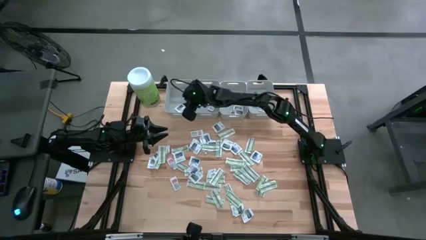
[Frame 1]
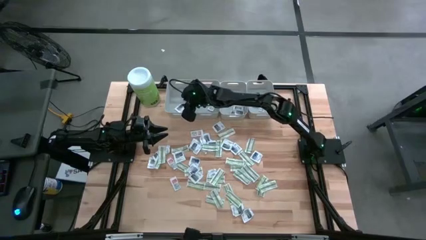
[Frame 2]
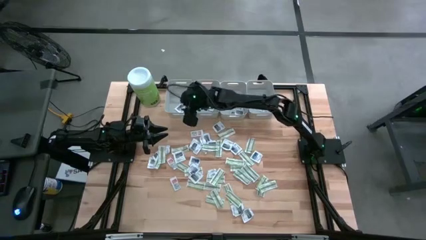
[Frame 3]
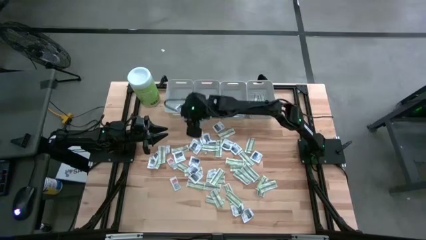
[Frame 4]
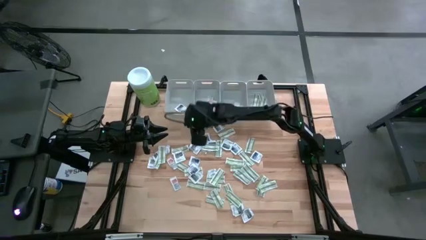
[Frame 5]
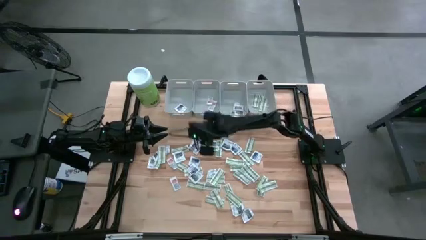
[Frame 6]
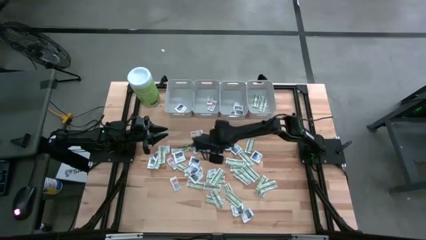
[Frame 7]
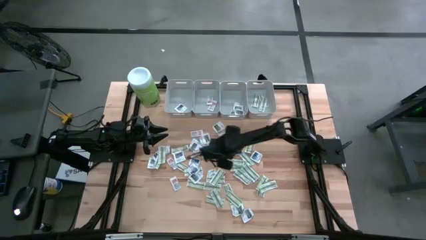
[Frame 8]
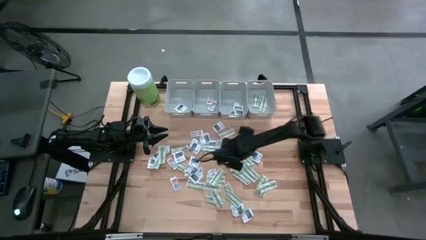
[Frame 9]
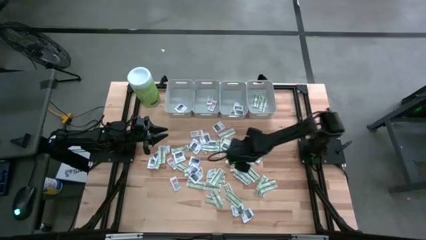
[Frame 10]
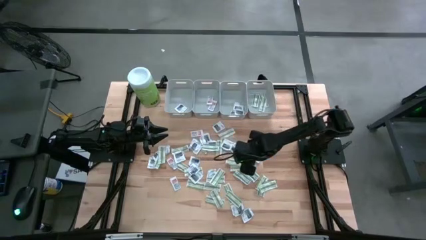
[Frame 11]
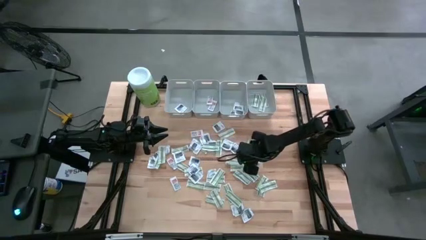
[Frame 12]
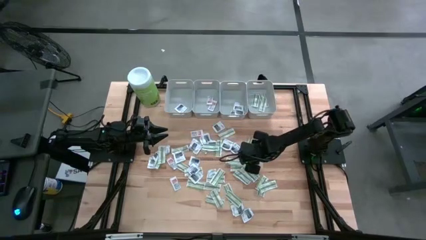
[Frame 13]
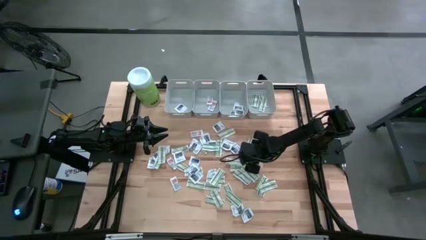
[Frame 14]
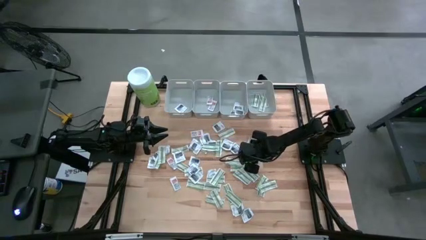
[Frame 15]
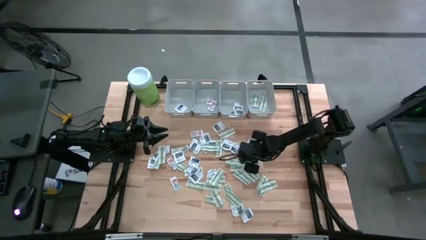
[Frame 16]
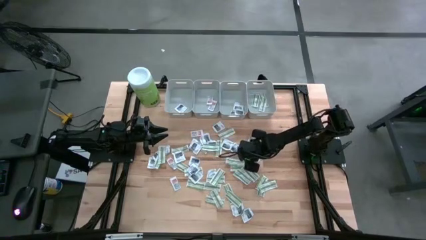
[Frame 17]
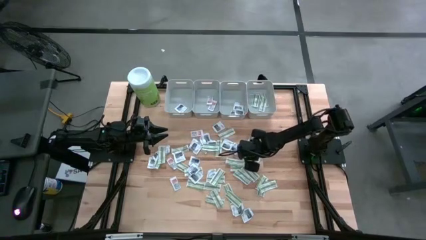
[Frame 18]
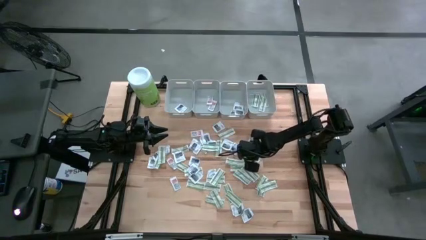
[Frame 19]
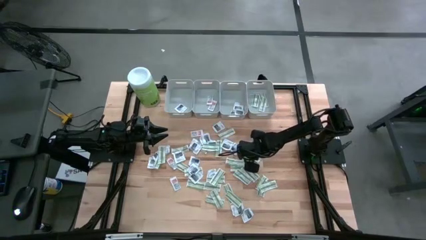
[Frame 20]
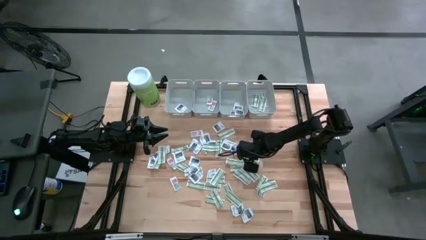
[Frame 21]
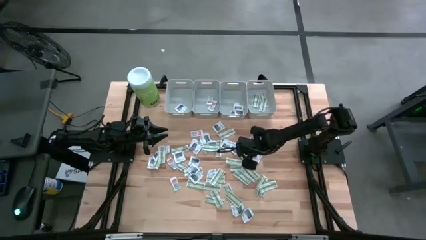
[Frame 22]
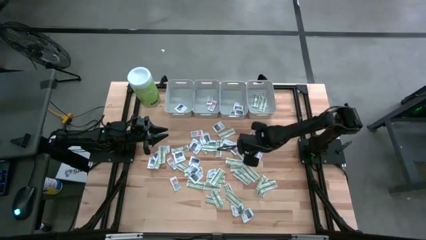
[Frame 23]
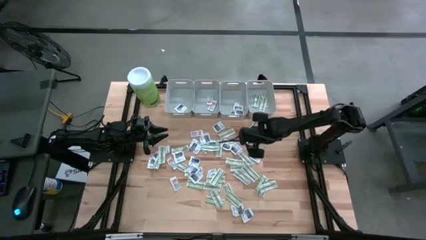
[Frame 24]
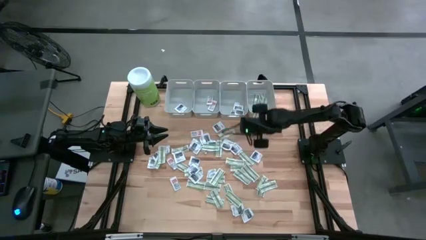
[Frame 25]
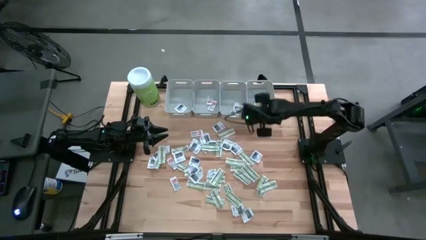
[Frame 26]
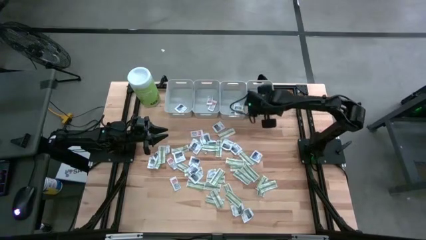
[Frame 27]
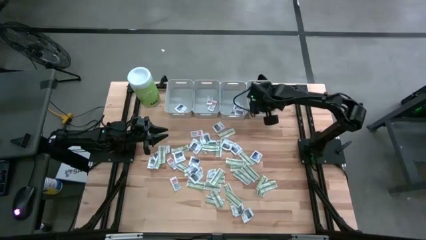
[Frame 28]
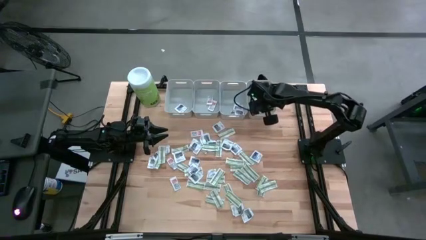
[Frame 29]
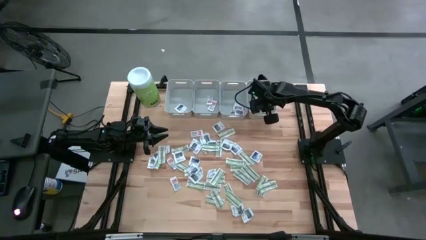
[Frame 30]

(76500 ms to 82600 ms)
Task: Pick & Place First Aid Supplies
Put the bandage into the right gray bin

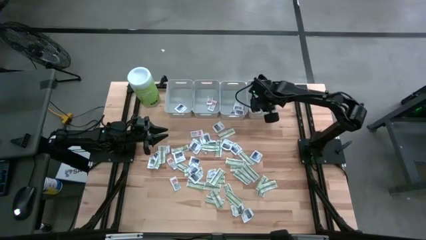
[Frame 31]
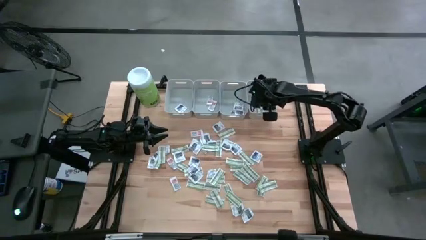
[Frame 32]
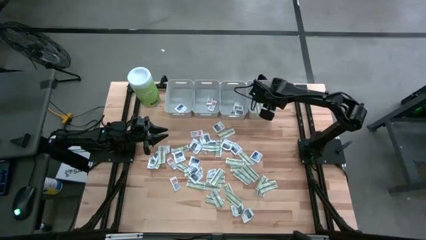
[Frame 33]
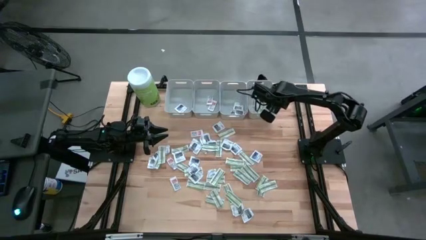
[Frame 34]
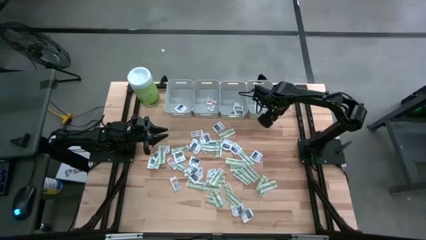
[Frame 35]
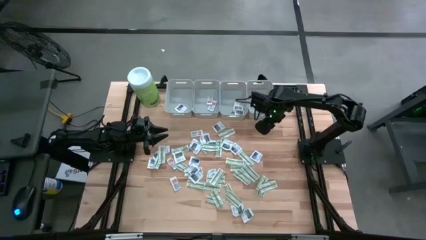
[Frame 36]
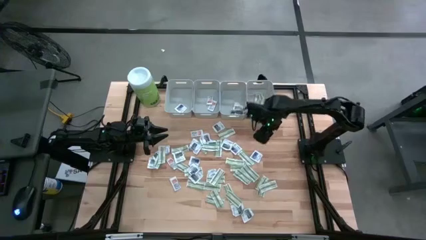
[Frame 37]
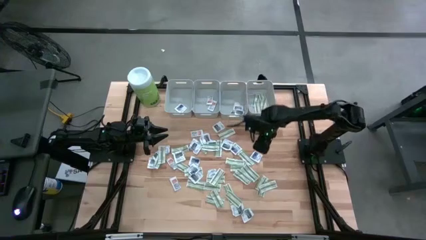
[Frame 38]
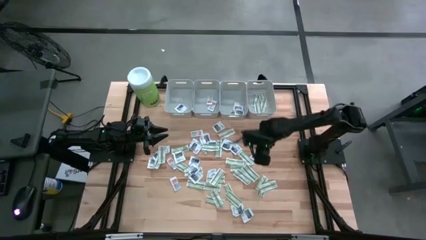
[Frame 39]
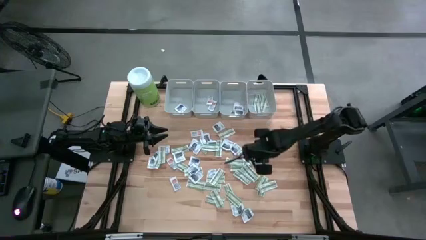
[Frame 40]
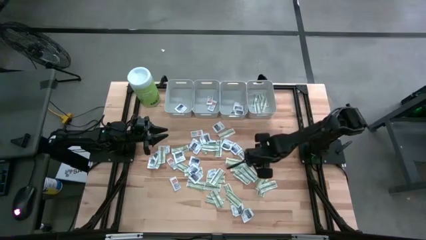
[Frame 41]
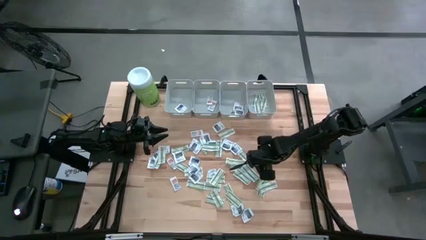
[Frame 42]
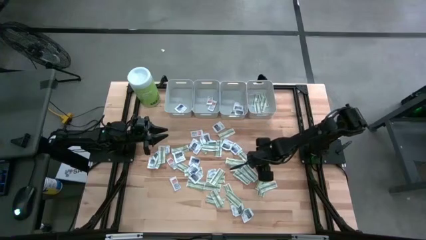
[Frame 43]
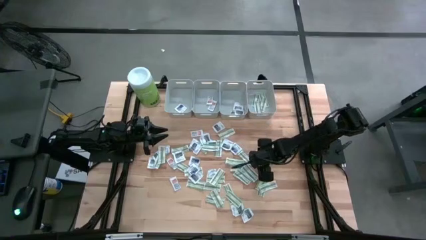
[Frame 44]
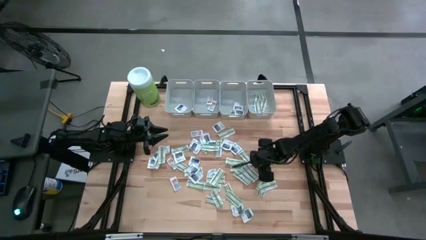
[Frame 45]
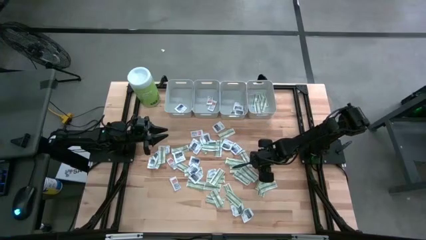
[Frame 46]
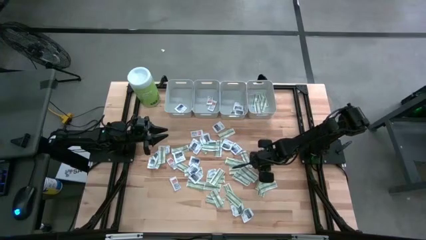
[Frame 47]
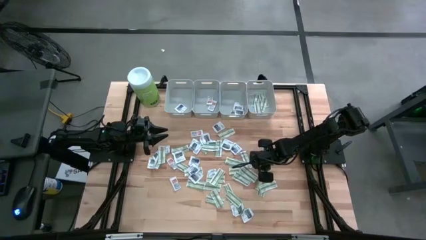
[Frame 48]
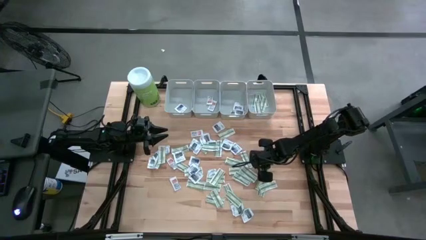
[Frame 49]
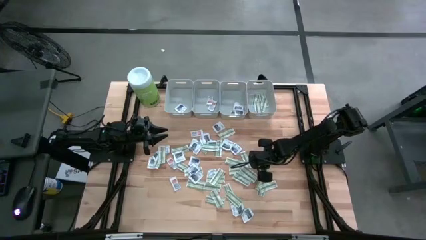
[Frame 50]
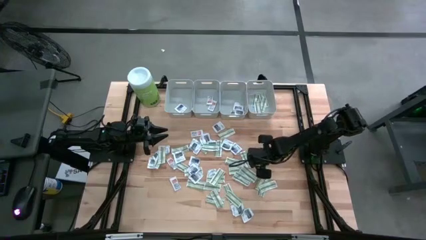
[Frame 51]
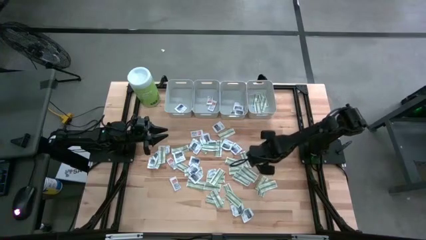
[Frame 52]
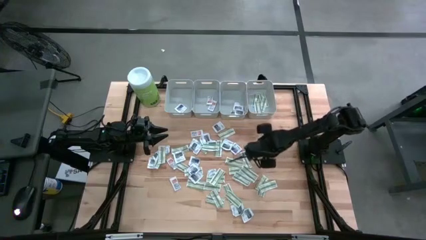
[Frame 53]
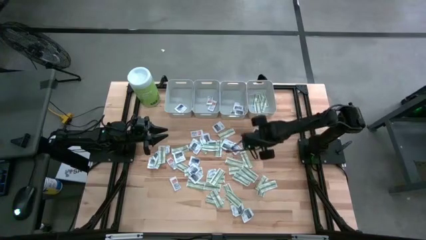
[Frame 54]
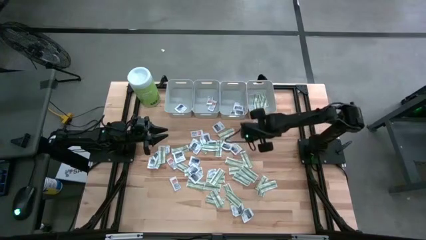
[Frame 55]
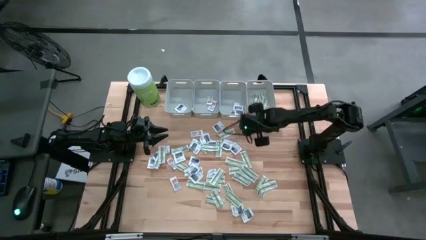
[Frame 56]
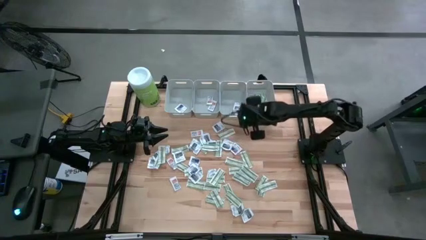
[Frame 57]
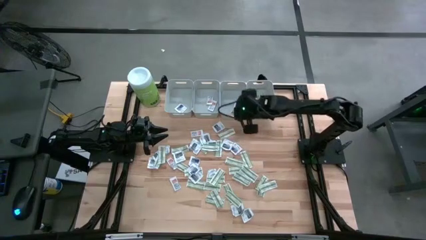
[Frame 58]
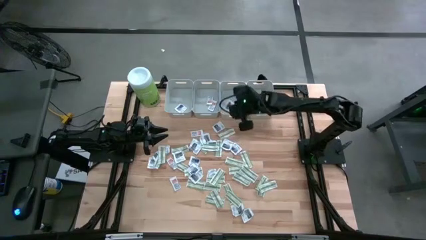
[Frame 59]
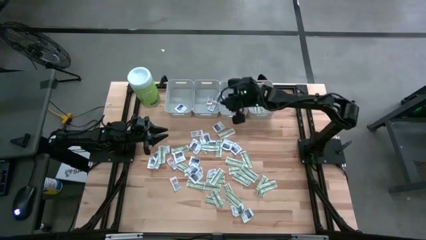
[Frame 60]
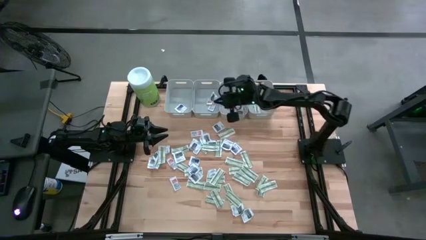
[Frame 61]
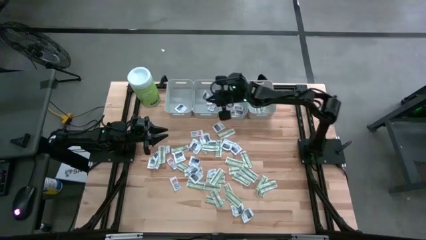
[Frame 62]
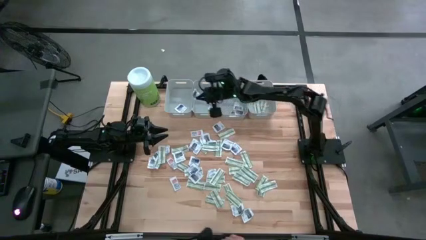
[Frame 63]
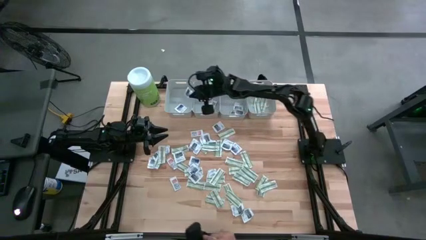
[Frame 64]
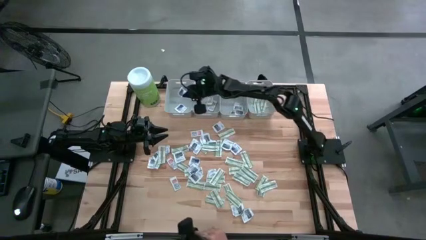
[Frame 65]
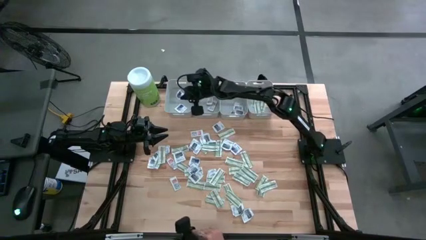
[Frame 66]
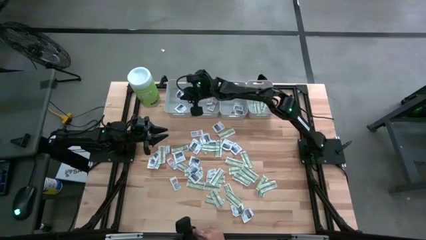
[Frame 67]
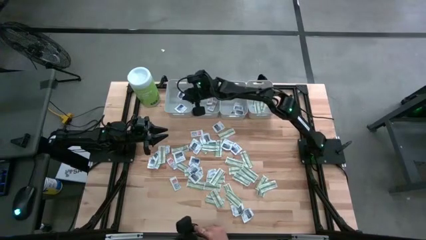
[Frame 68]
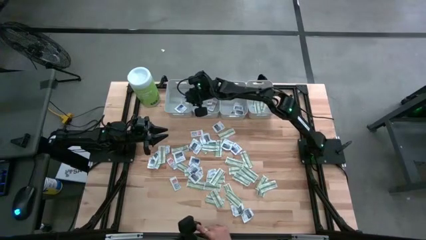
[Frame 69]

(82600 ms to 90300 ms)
Put the alcohol pad into the left gray bin

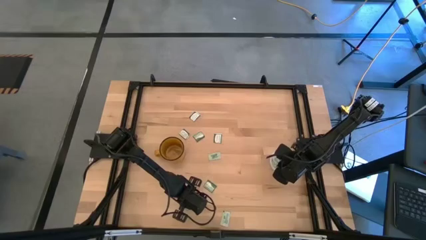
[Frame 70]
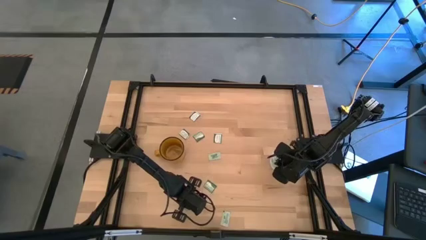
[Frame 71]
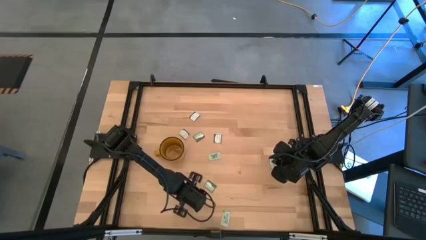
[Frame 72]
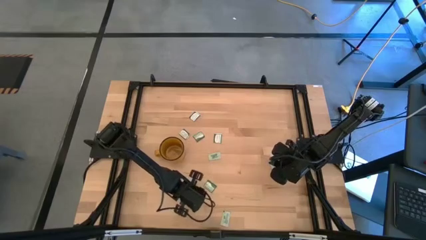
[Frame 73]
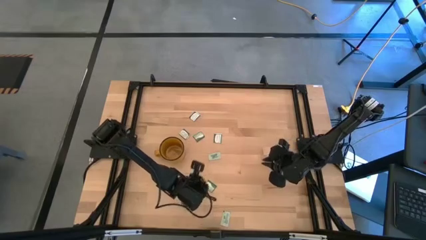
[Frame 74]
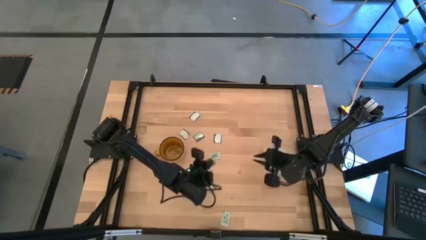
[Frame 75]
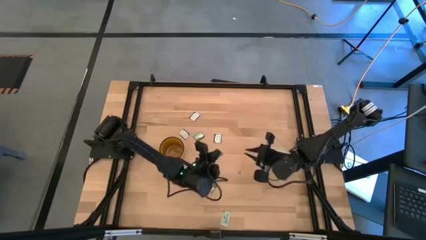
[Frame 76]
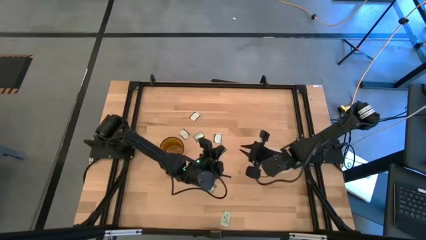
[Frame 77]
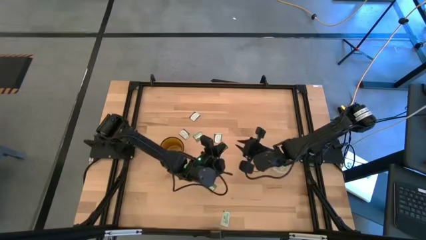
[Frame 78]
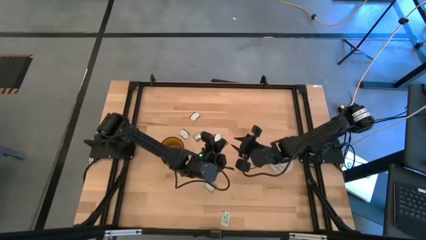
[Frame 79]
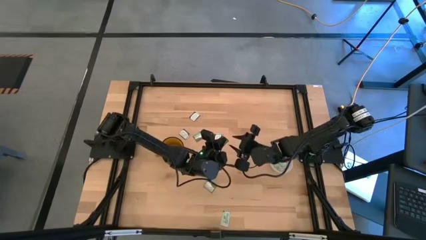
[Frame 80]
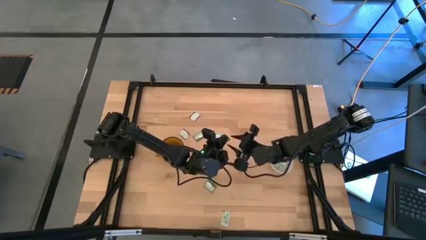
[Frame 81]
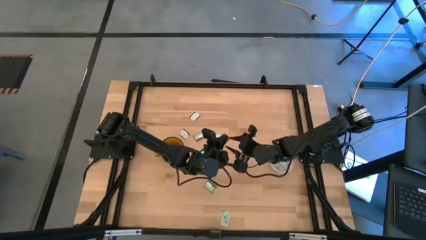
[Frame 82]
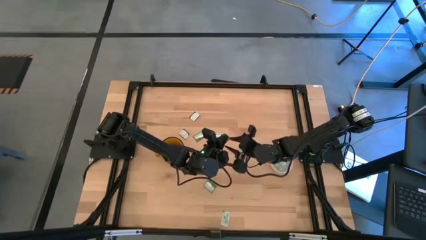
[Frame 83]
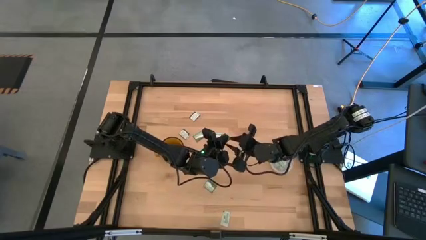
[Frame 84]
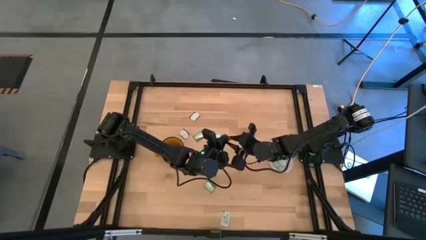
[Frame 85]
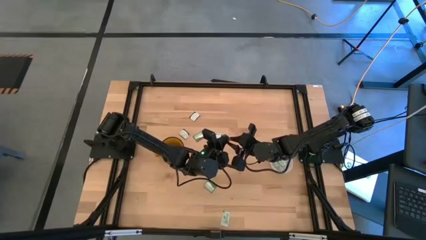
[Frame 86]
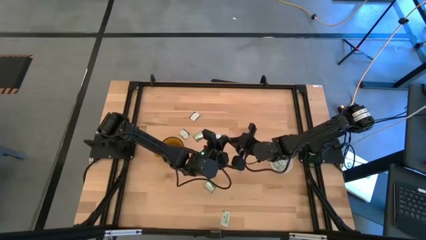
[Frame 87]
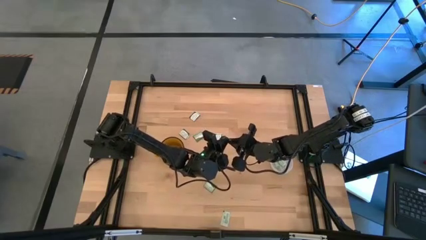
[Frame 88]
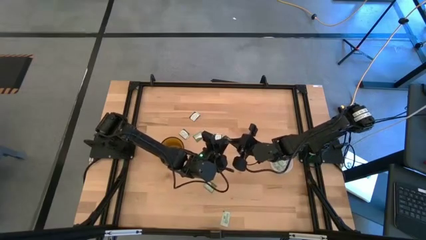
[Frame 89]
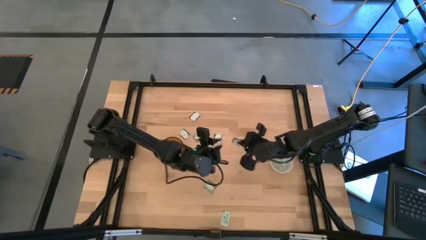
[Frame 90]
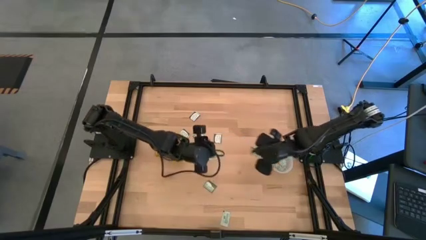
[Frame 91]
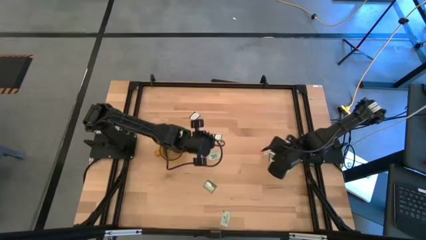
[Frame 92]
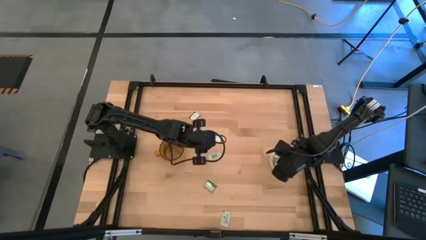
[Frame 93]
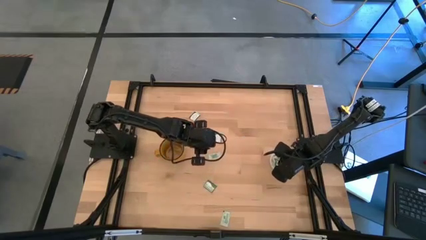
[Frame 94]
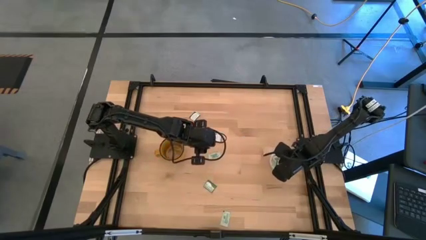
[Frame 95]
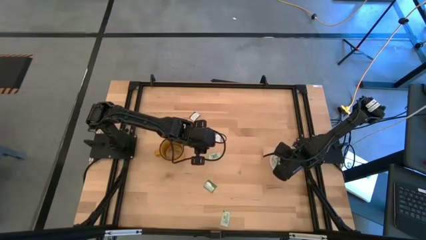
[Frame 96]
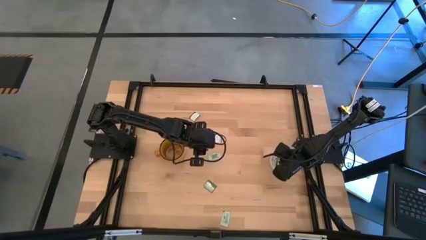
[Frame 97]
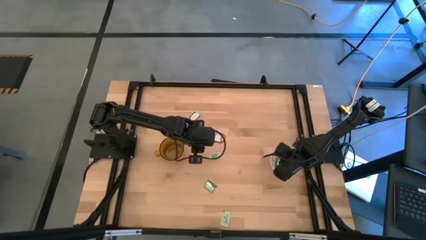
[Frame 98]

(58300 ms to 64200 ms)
Task: Pick and place Stevia / Truvia into bins
Put the green stevia packet into the transparent container
